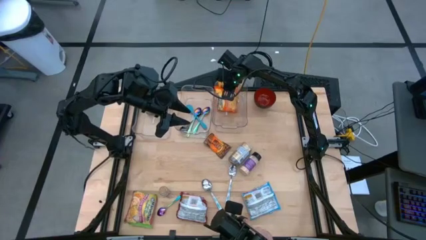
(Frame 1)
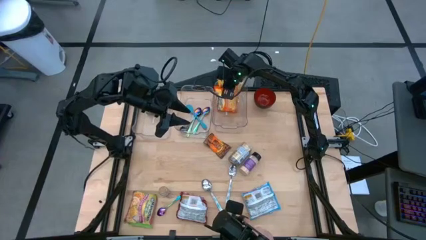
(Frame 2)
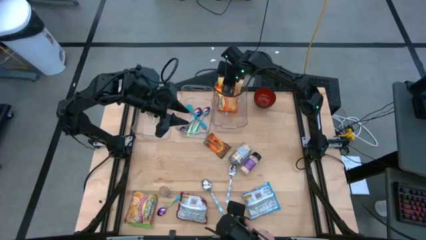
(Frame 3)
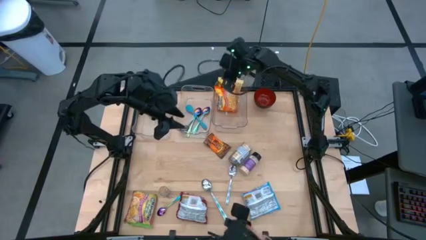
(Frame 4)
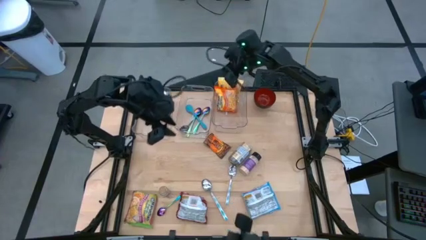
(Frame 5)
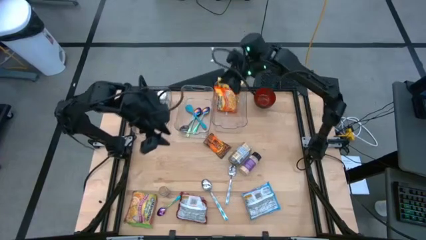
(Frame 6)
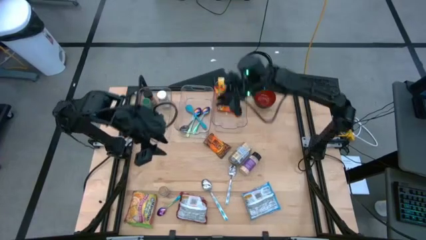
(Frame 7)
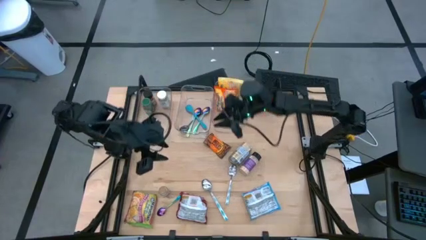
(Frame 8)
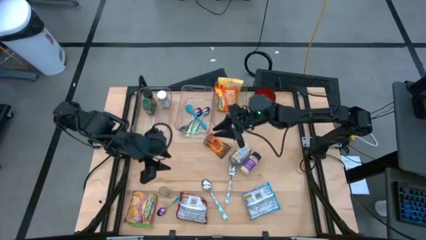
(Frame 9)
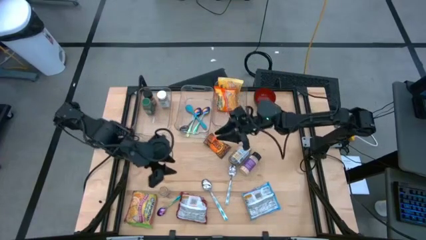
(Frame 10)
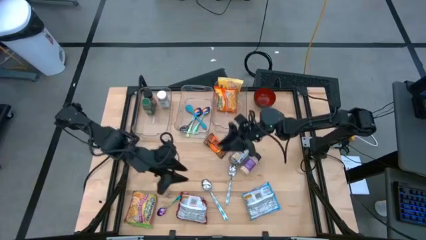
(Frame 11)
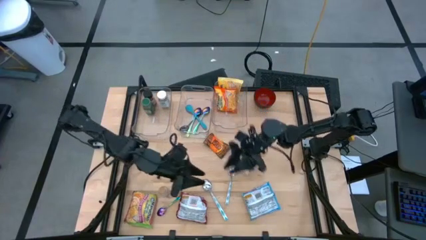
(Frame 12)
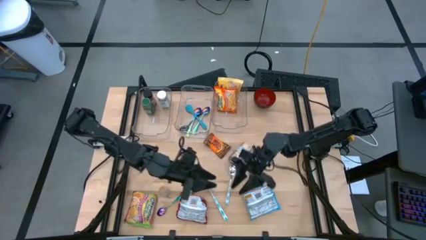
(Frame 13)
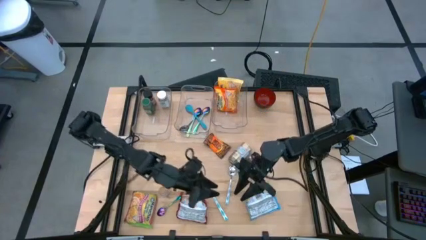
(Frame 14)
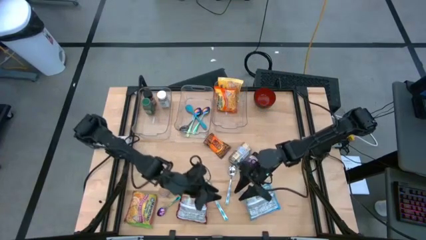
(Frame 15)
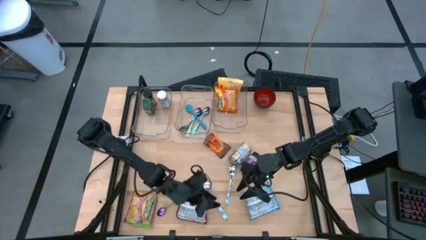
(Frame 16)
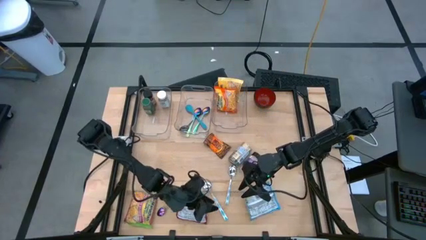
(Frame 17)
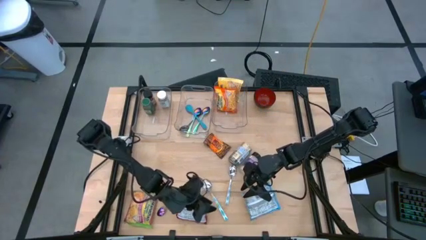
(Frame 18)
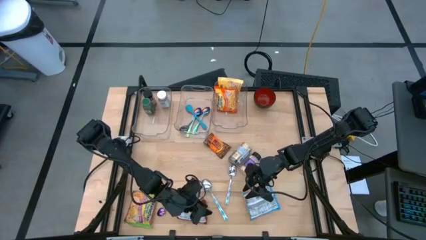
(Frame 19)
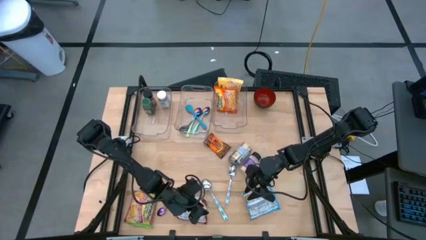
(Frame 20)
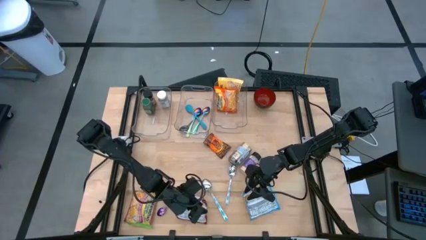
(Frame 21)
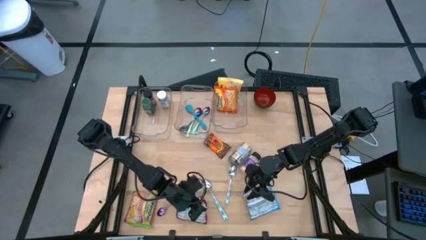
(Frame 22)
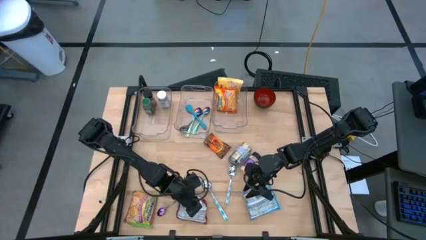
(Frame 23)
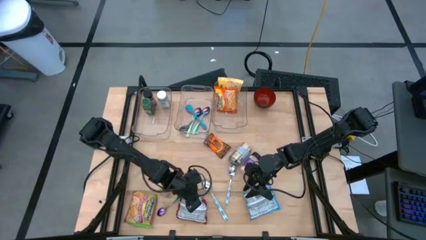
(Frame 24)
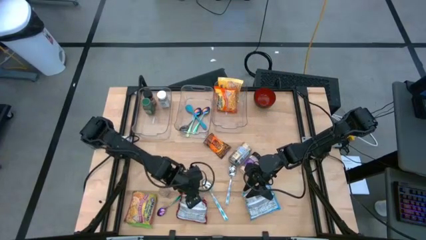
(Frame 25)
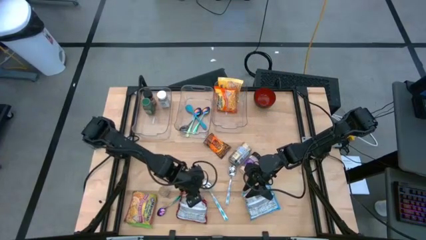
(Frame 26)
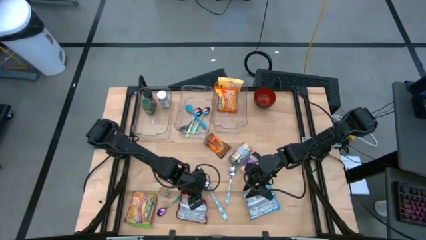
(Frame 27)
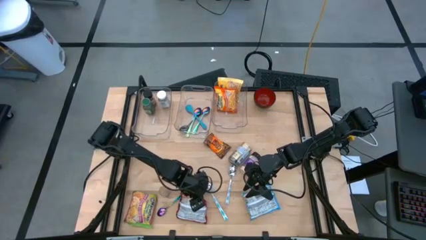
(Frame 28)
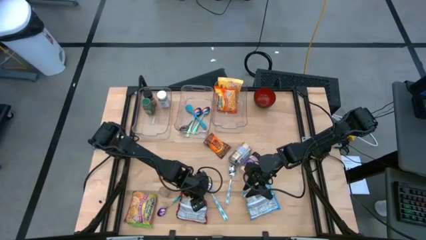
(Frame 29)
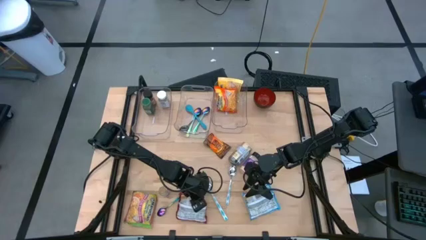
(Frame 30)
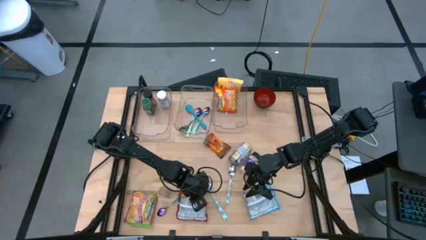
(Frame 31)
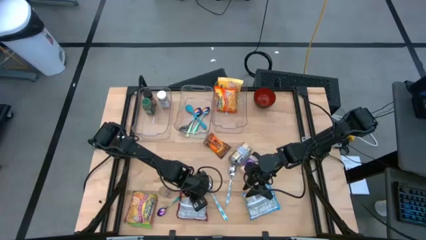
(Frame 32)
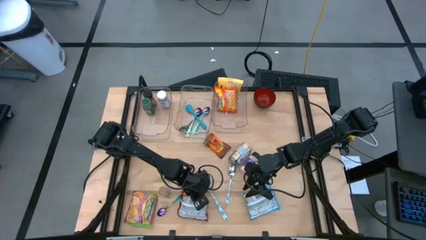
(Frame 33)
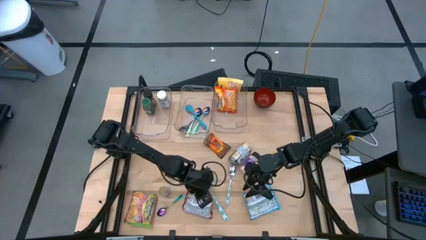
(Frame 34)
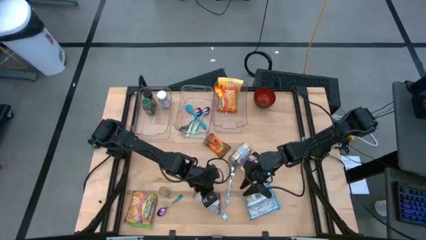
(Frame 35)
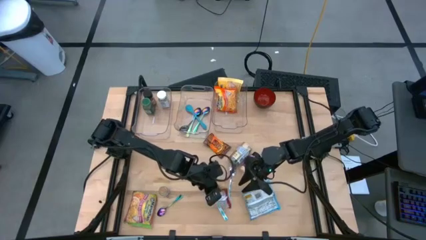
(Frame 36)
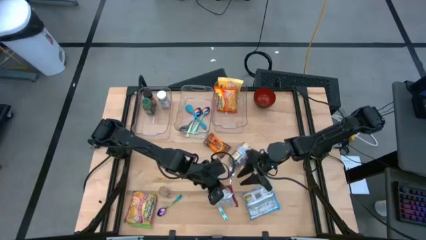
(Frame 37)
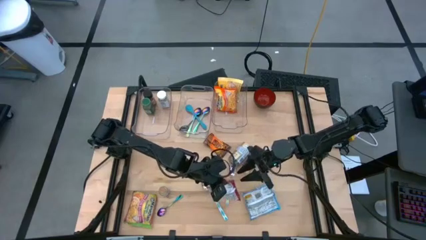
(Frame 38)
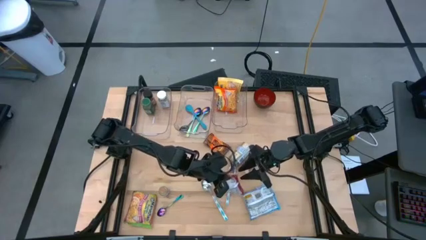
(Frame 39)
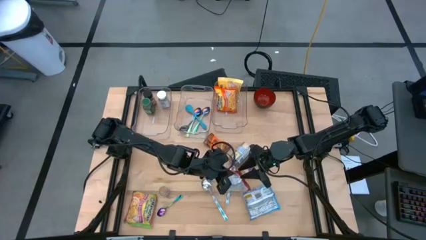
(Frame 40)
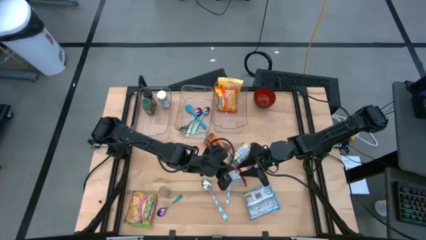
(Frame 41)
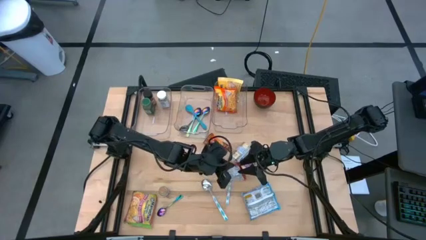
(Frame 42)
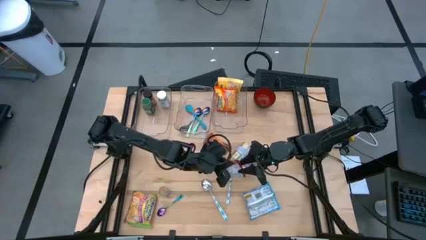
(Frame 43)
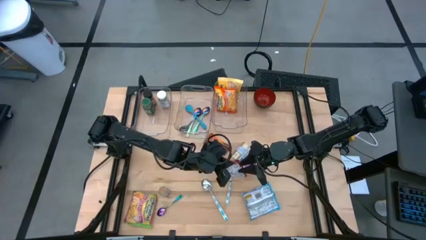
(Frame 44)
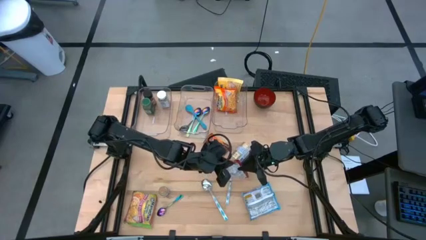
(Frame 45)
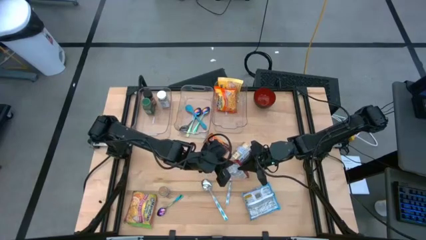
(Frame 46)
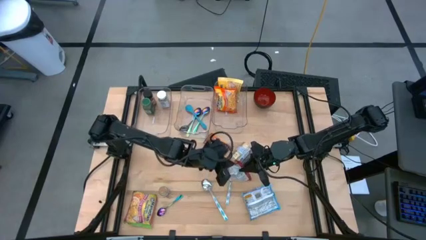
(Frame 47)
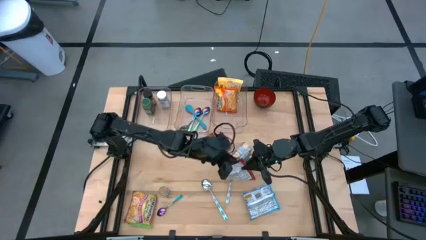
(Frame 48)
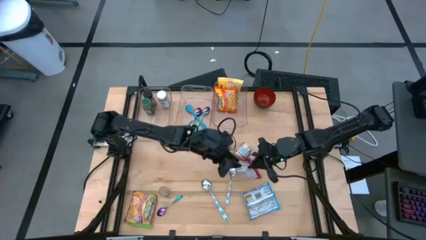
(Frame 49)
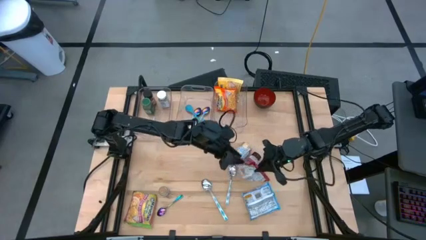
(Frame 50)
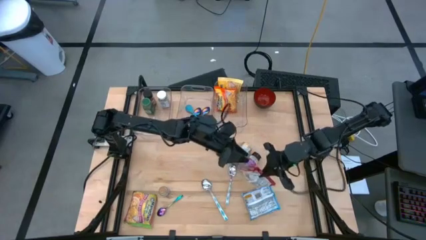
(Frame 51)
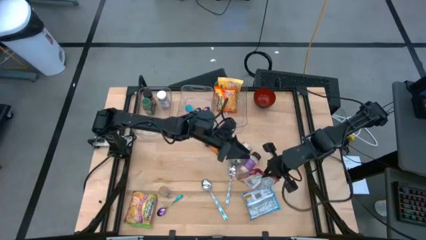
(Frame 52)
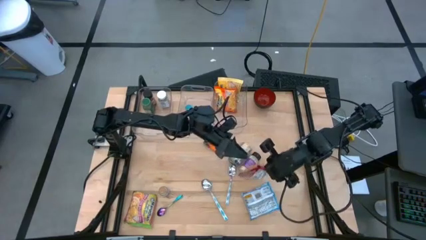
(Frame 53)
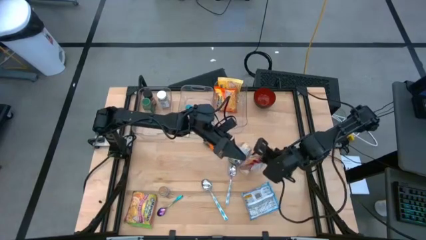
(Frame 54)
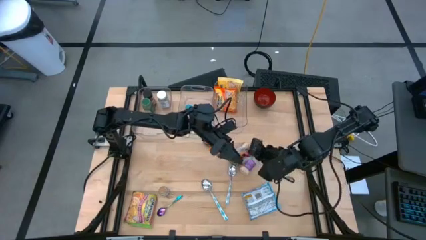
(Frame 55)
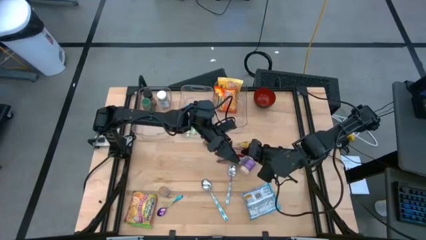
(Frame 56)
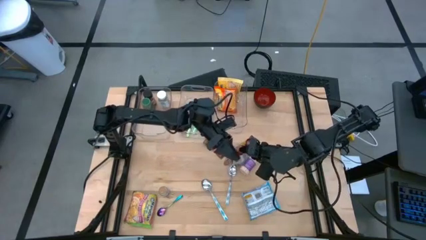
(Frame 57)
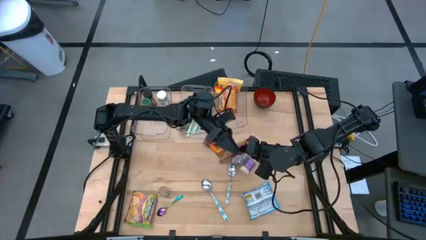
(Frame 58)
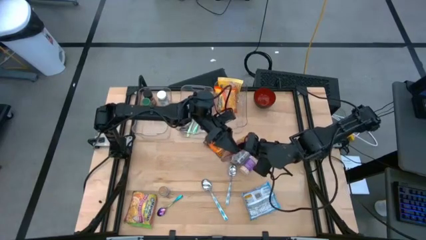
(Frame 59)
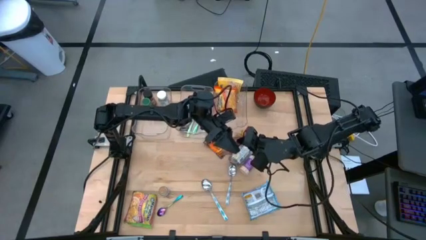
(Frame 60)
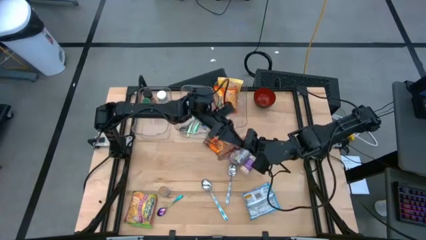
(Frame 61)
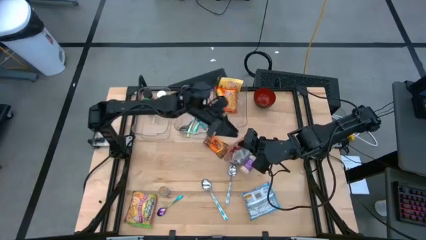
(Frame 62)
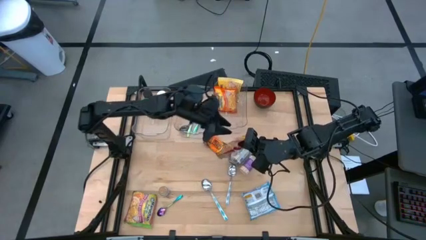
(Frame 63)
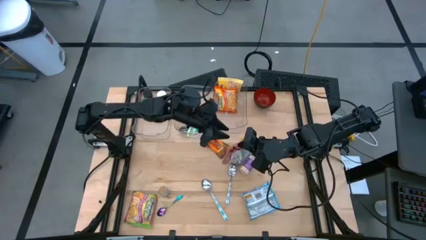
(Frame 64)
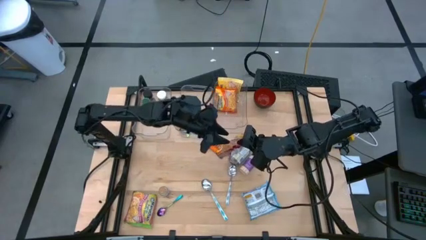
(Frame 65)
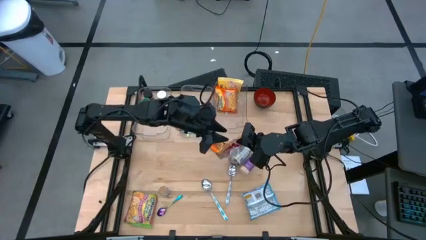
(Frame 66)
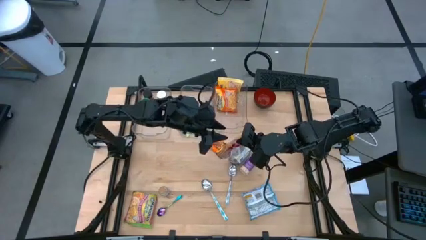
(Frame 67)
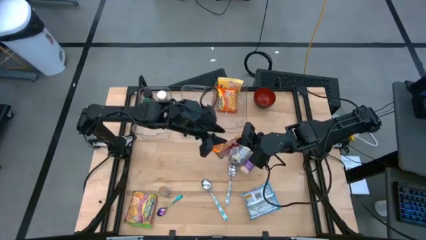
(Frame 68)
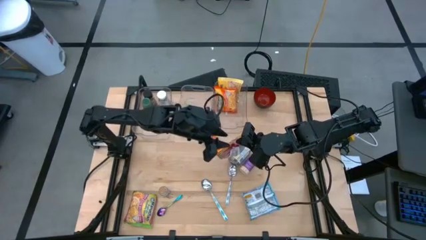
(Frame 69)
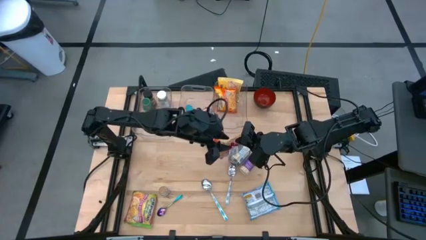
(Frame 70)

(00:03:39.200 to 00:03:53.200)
Task: Pick & Place Food Item
Put the red noodle pack into the right transparent bin
